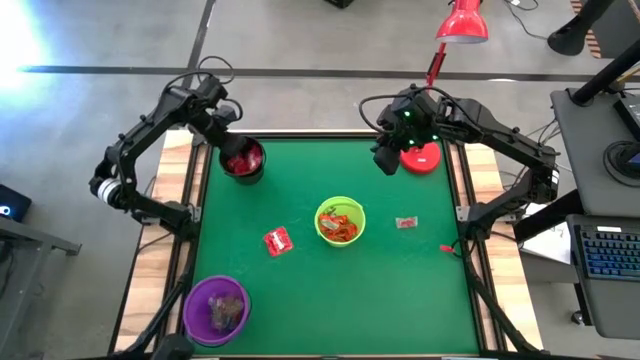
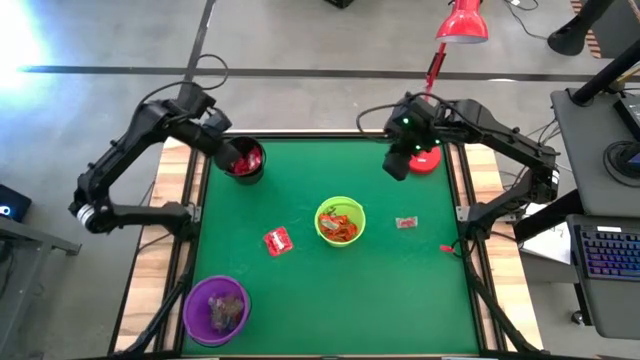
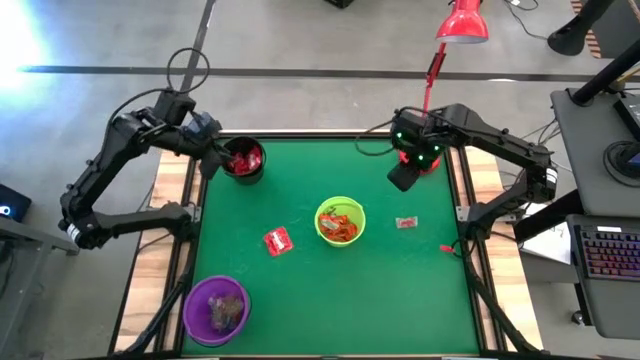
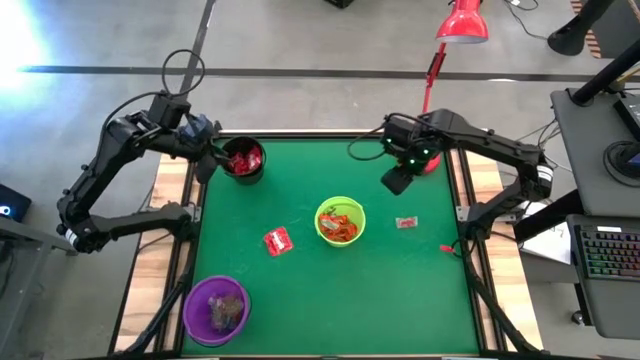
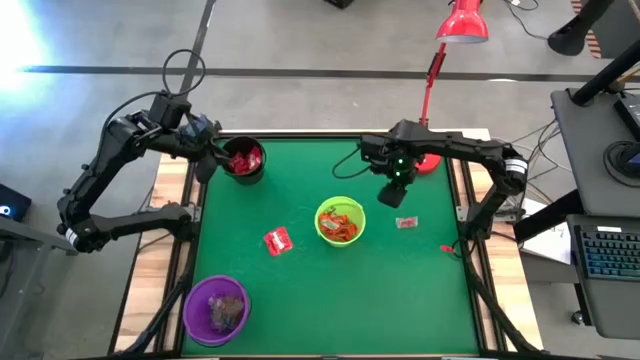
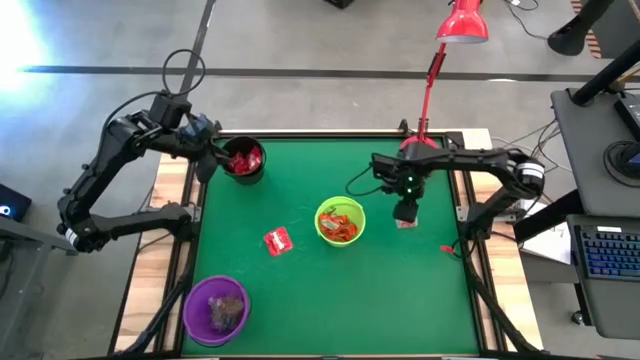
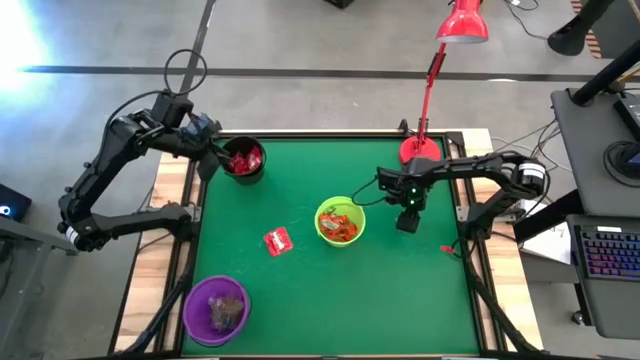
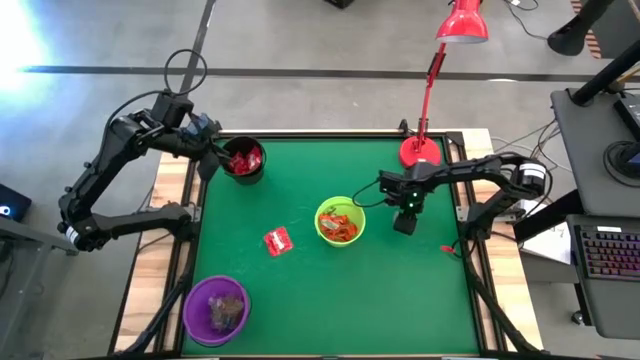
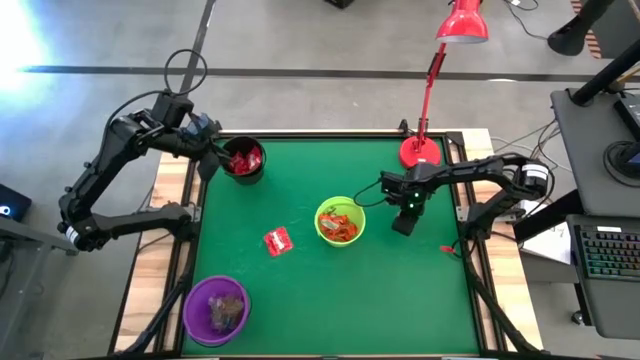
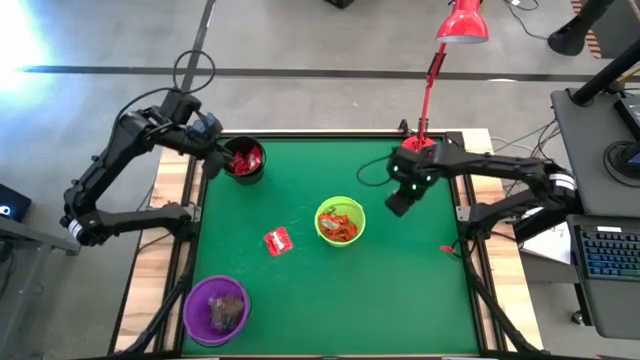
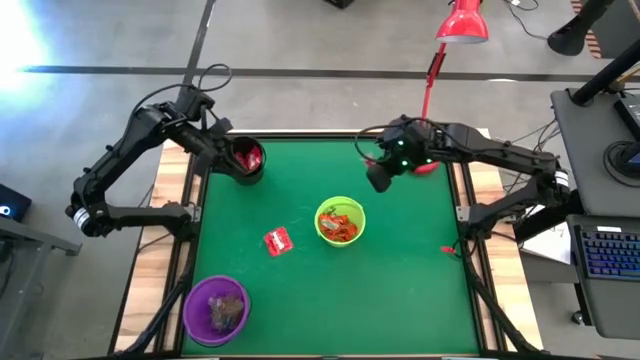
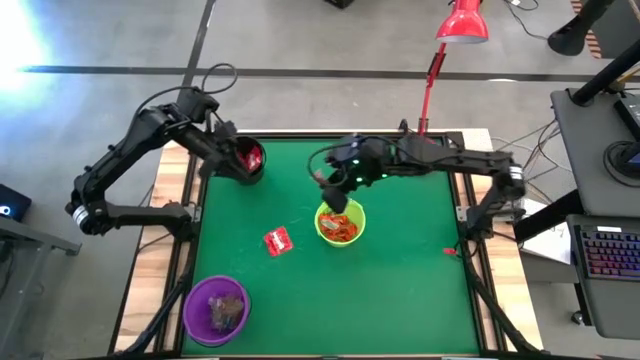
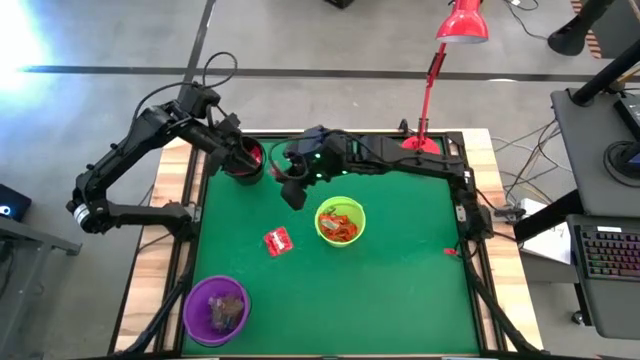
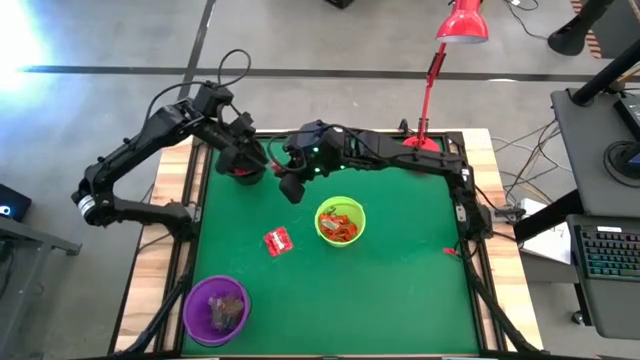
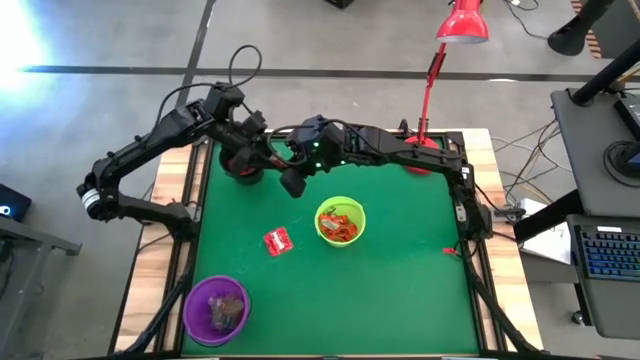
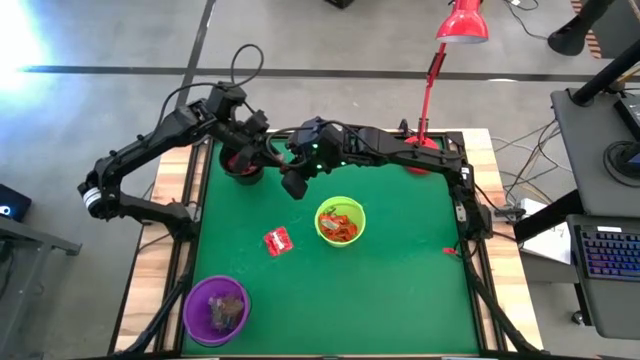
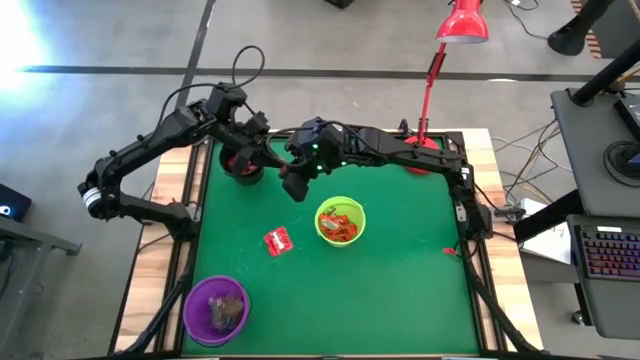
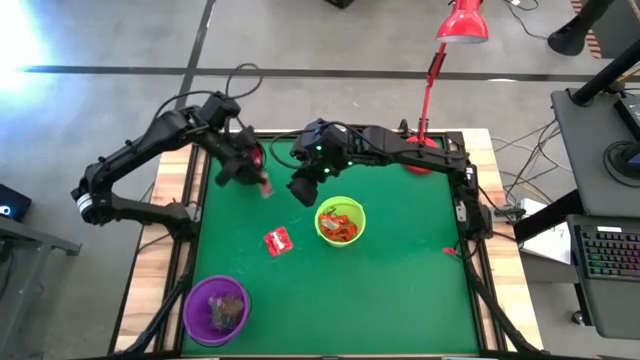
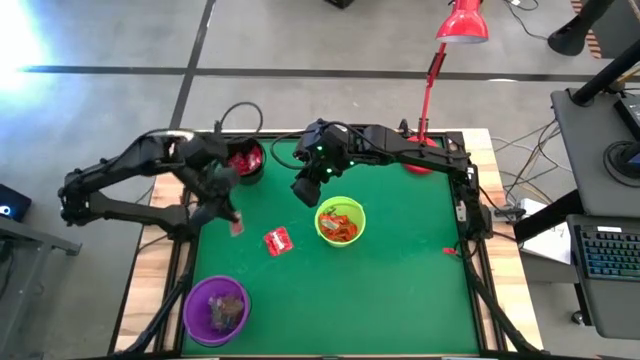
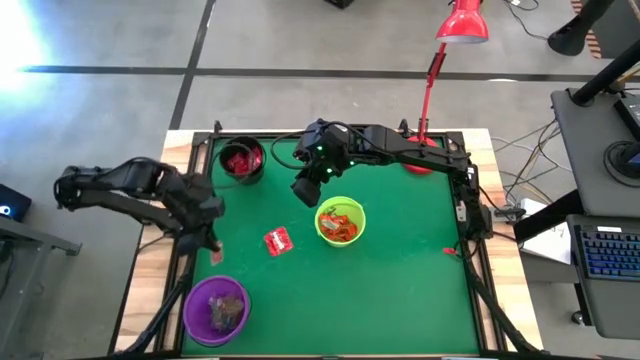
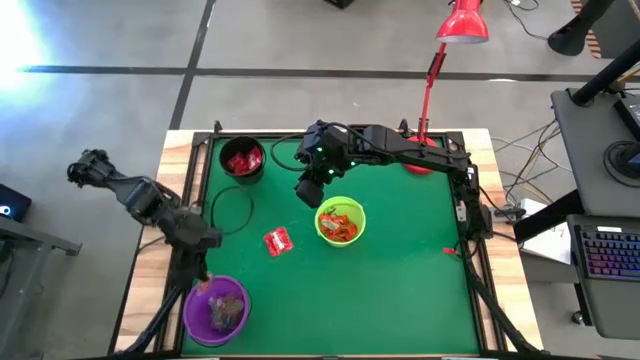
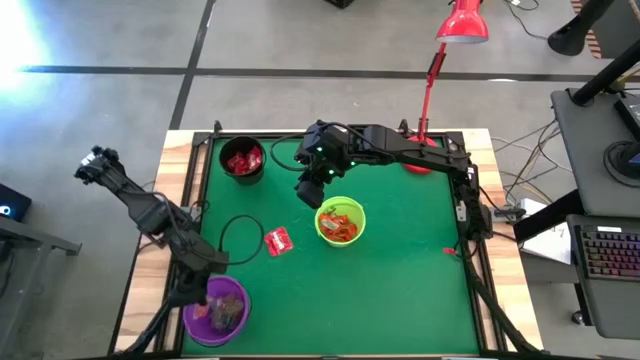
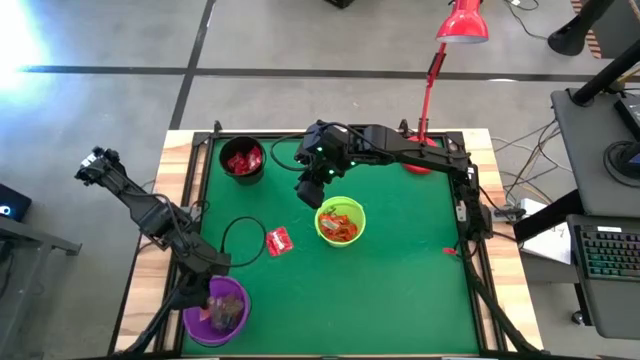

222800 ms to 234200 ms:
Task: Sort candy
Put the red gummy into the purple bucket

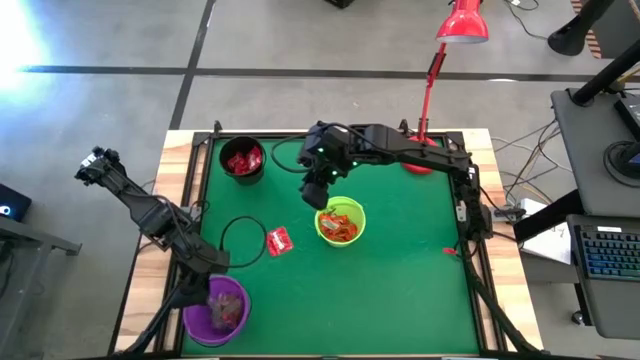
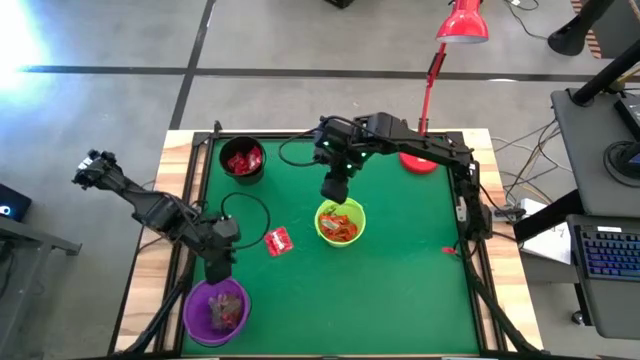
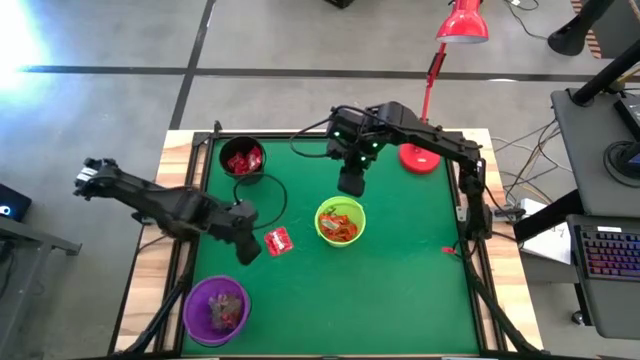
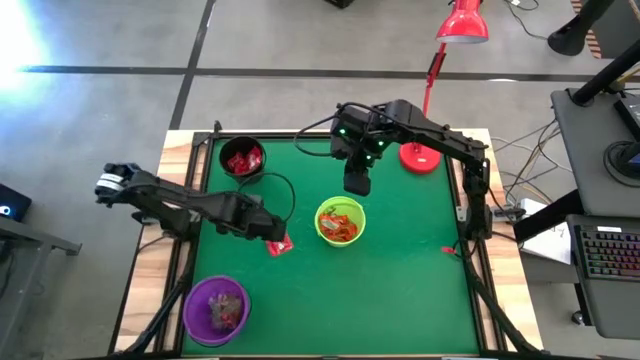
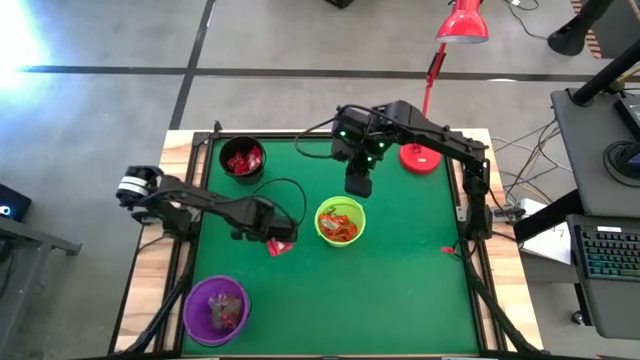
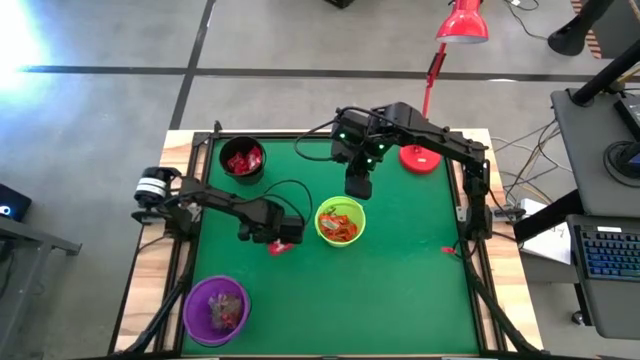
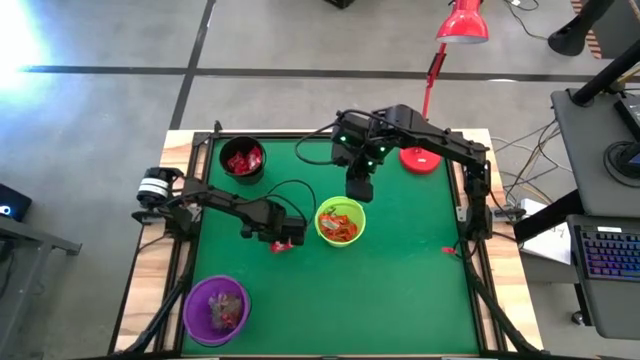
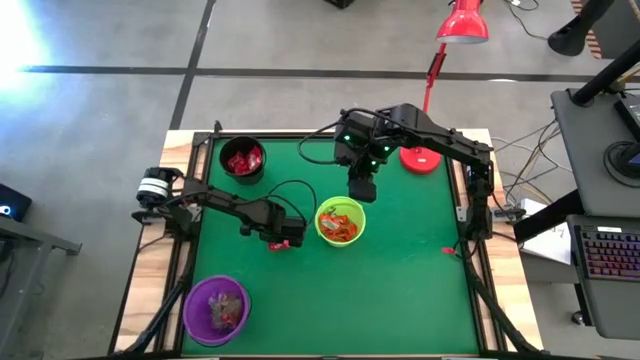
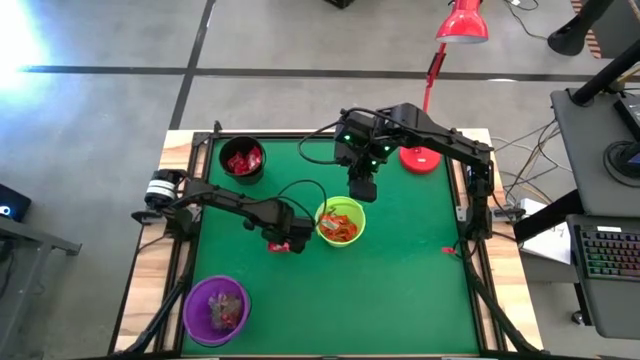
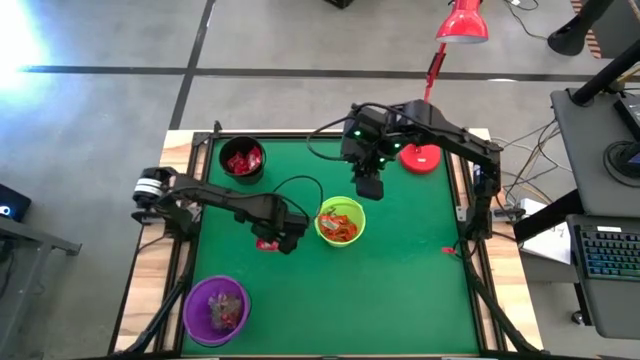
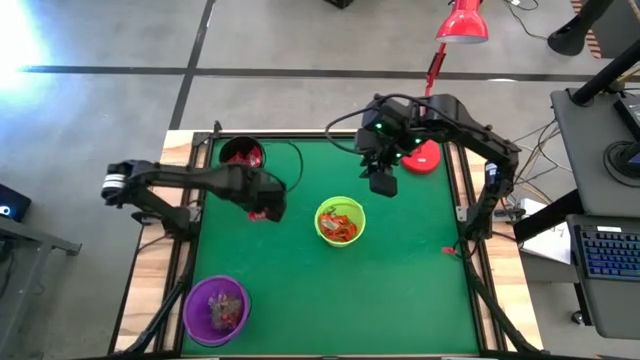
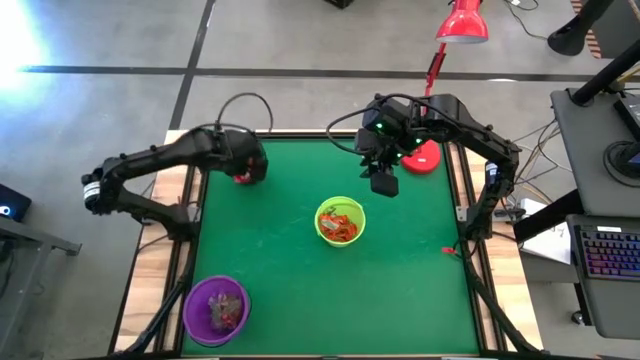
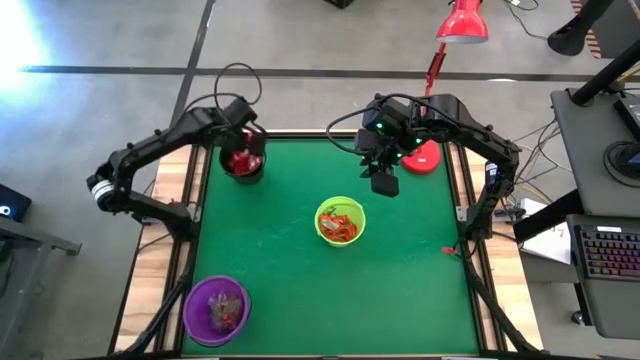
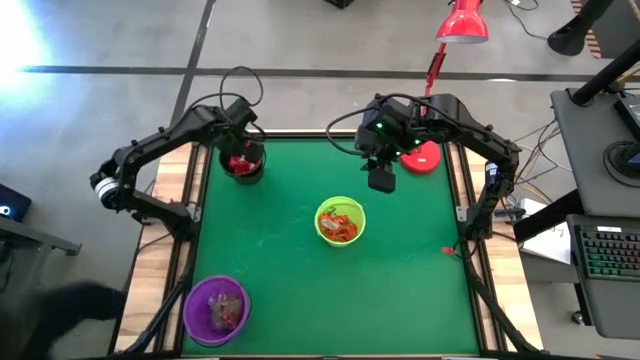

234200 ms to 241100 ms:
Put the red candy into the black bucket

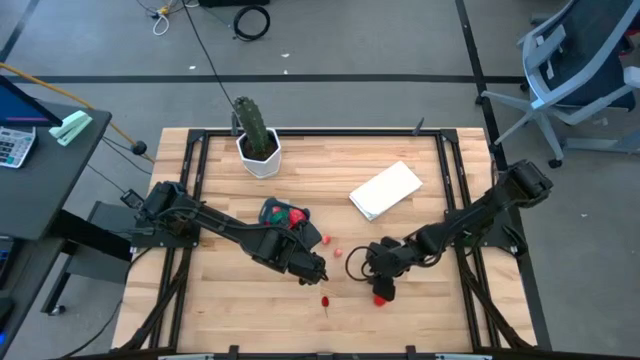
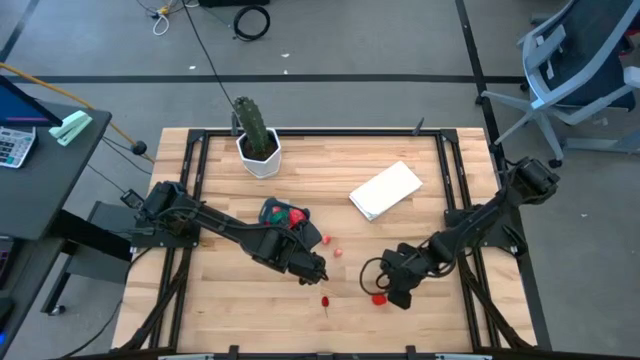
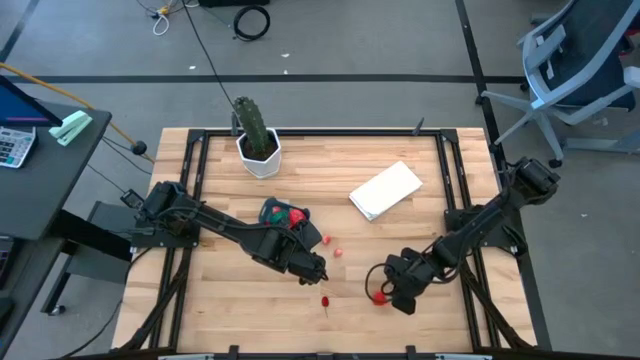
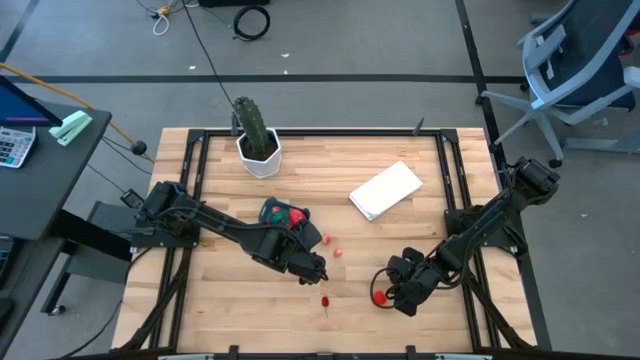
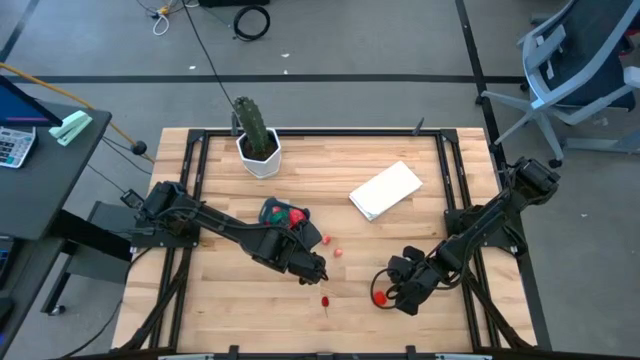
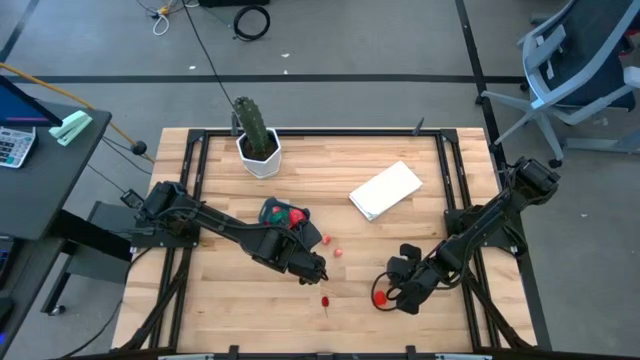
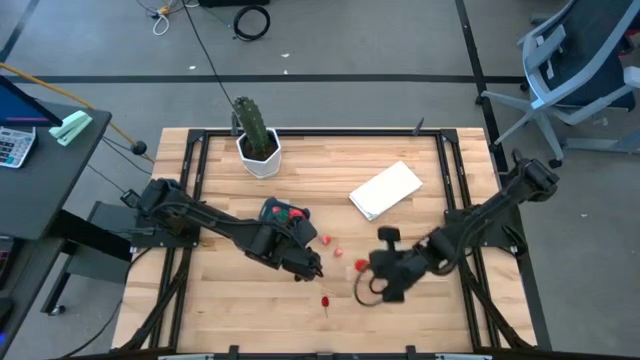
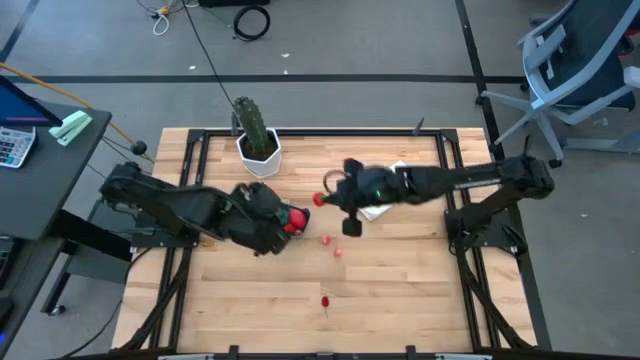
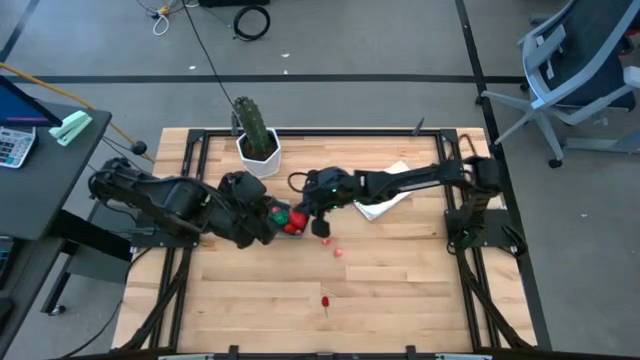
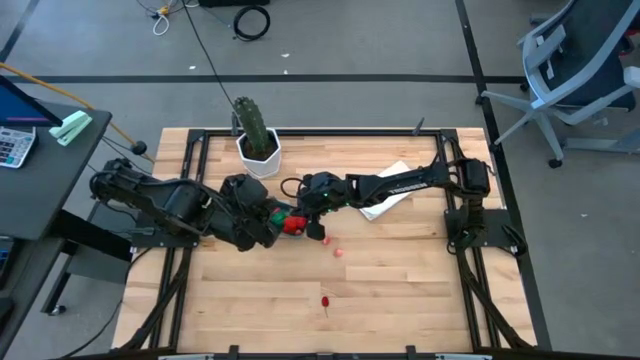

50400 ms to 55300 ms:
Task: Pick and placing Produce into tupperware
Put the red strawberry into the blue bin
